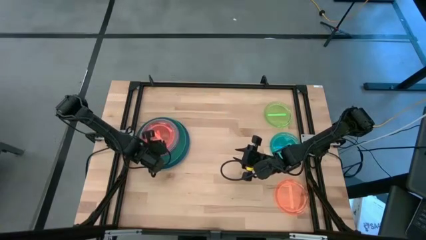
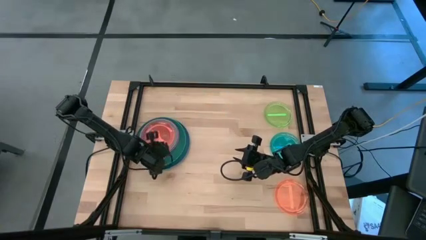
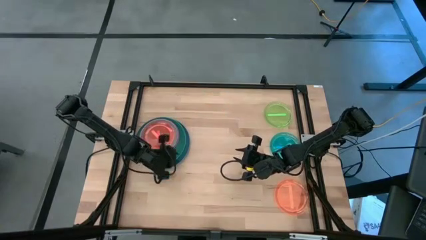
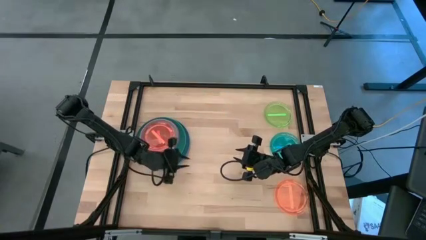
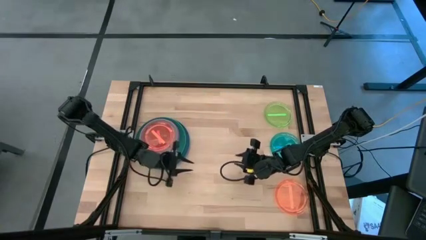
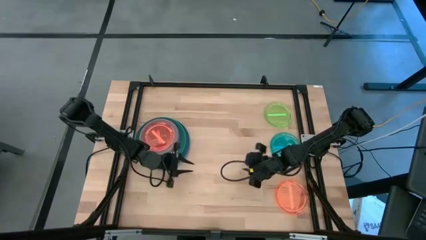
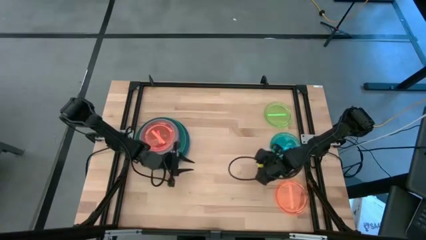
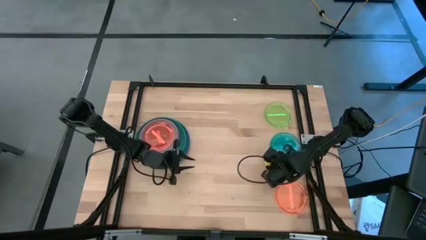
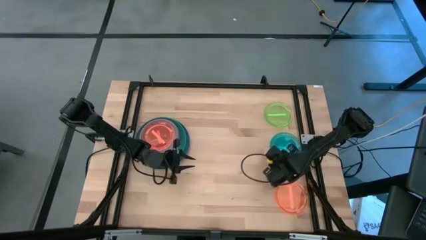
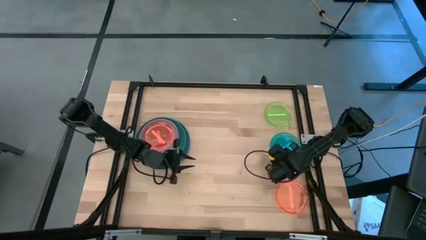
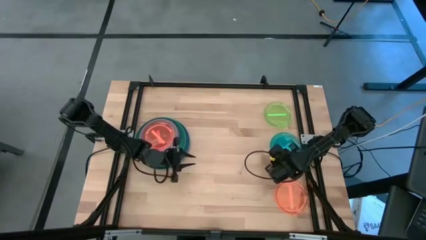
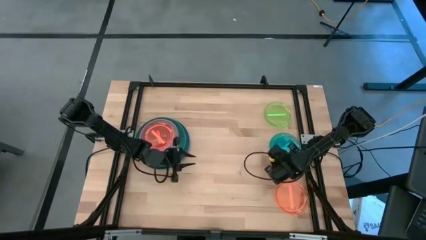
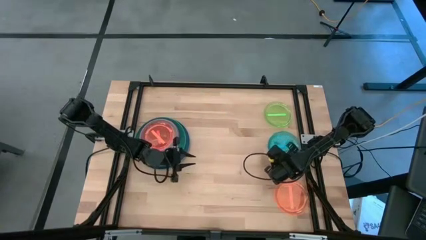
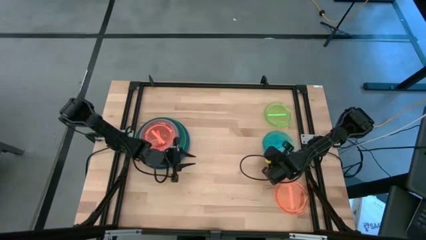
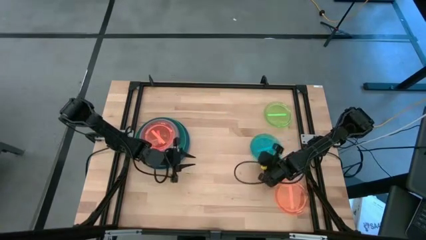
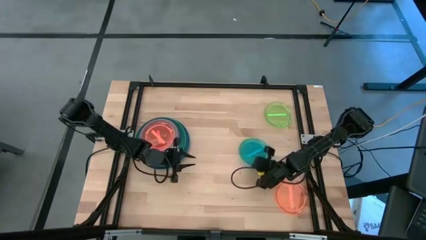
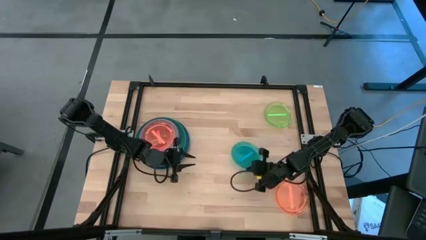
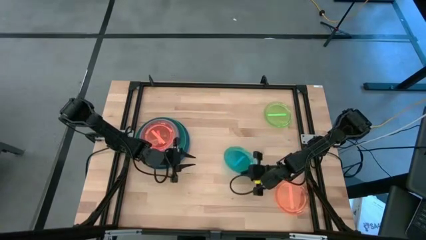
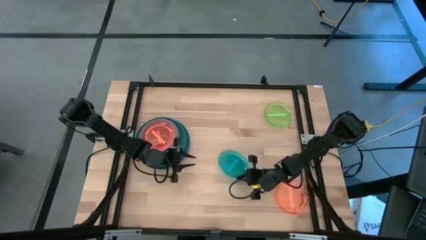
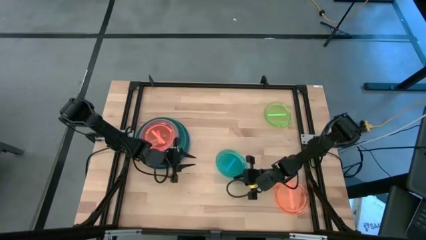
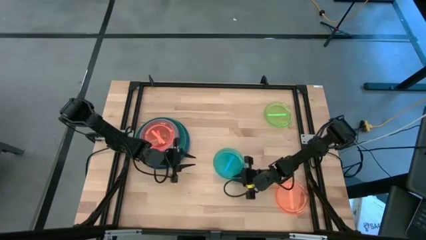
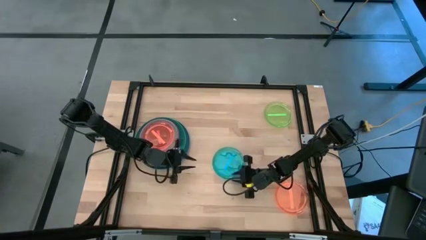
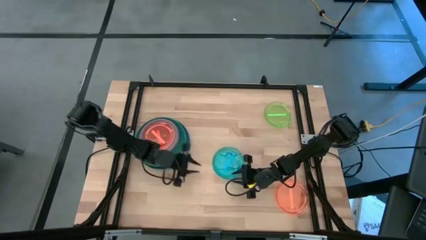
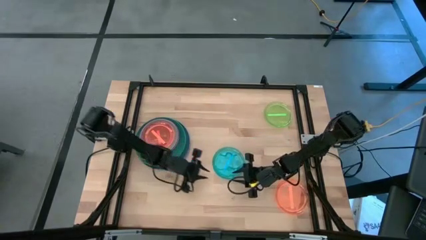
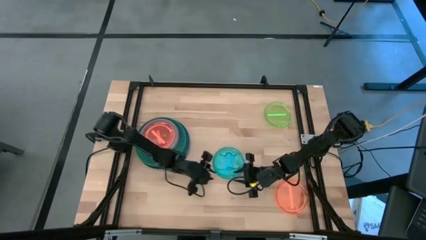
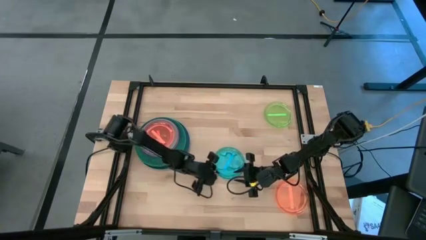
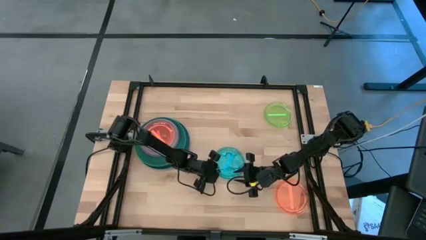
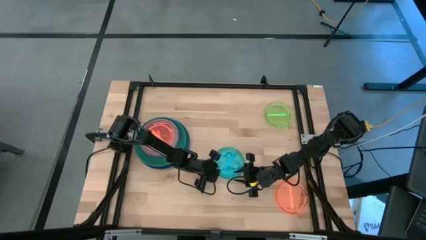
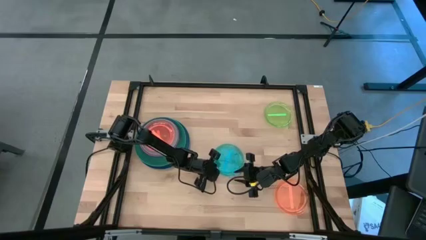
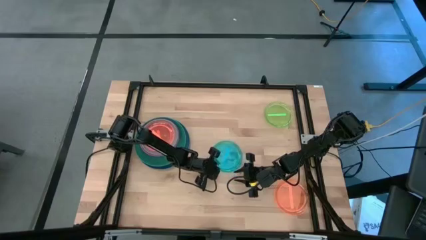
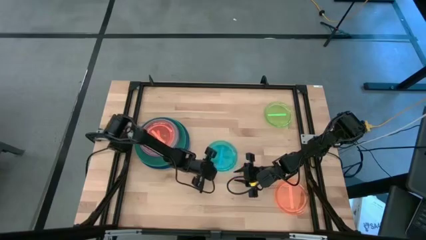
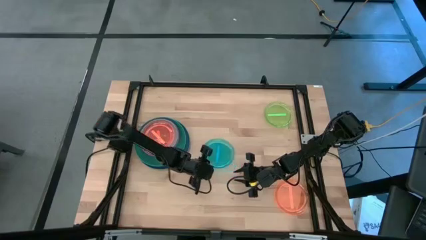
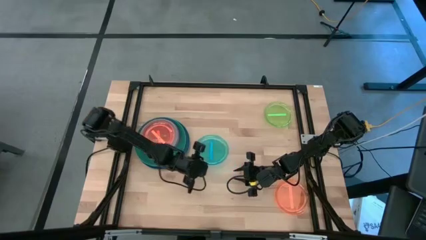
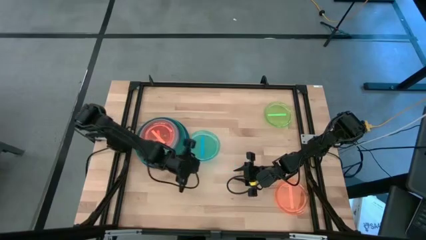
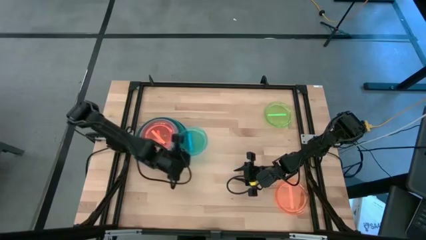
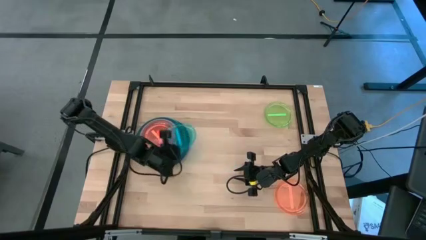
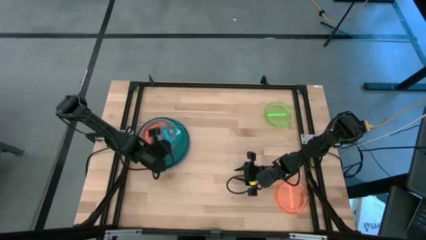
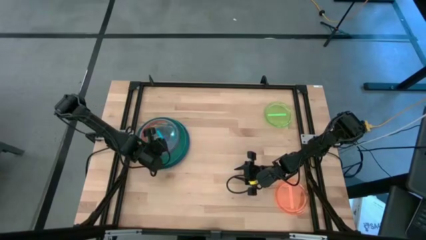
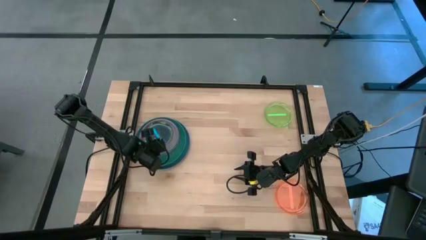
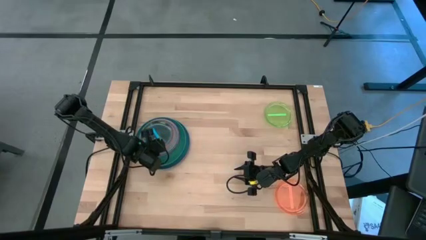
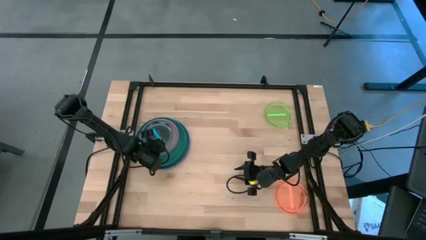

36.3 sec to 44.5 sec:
Task: Stack plastic plates
Stack the small blue plate on top of the small orange plate

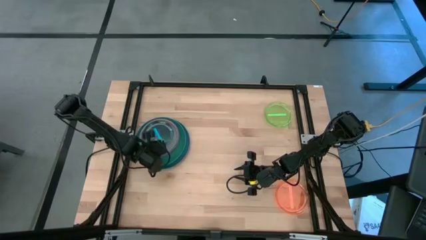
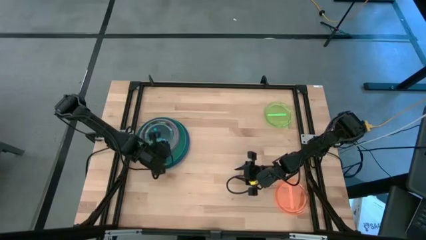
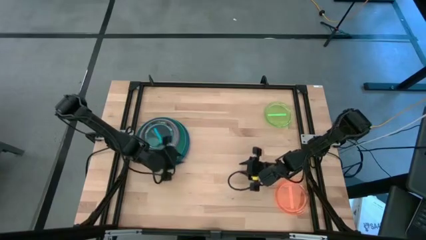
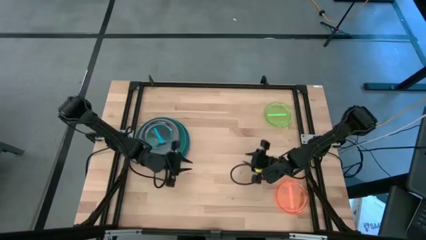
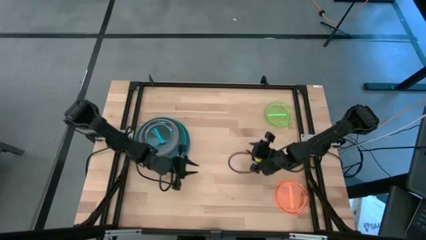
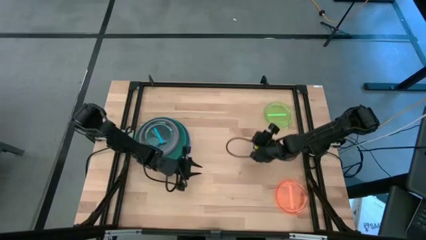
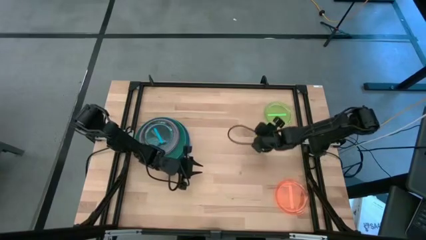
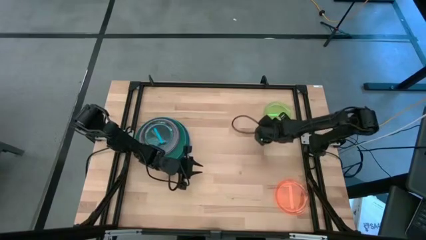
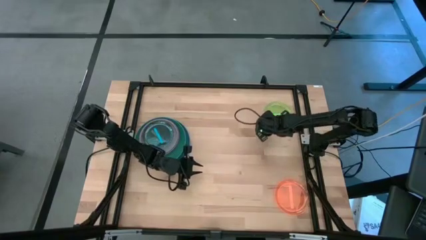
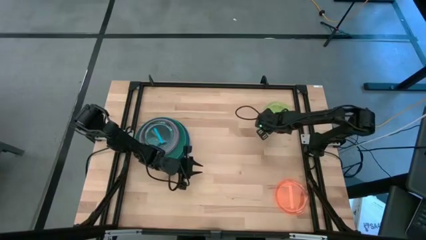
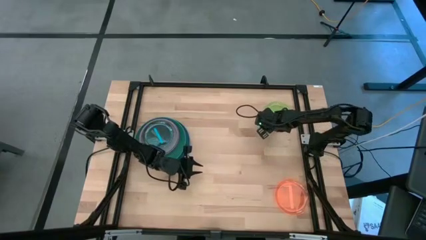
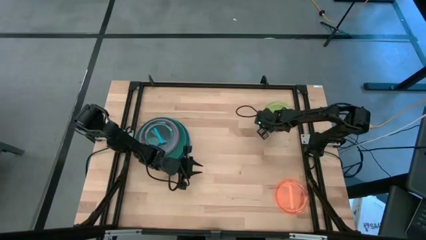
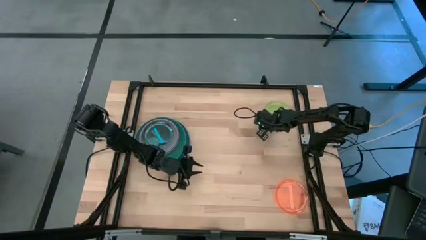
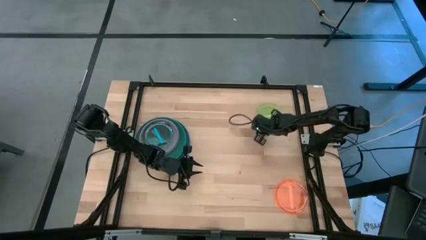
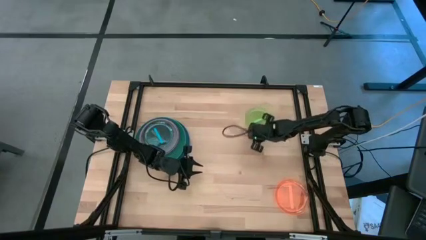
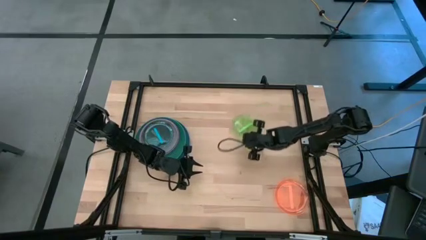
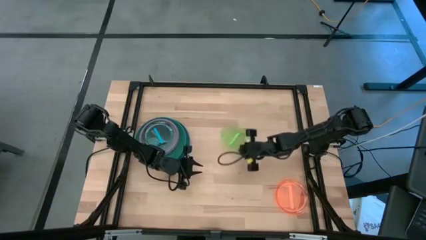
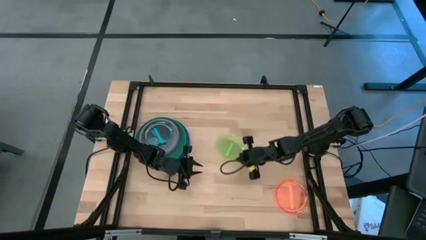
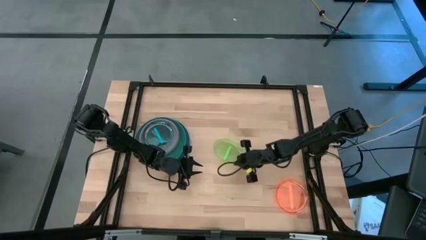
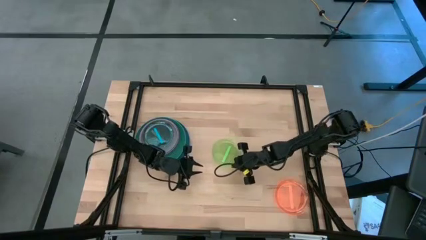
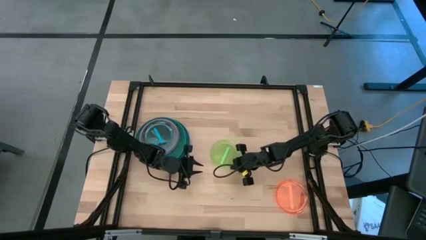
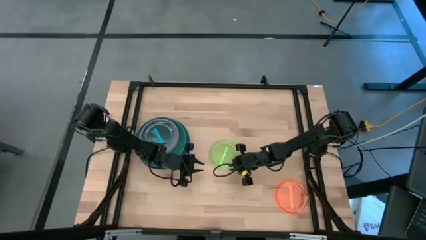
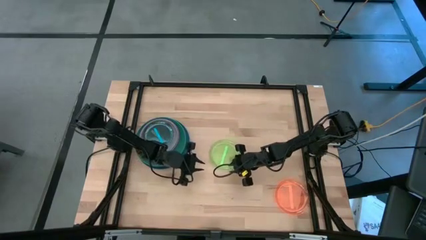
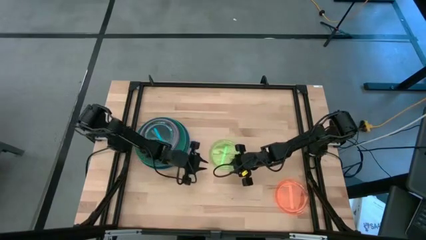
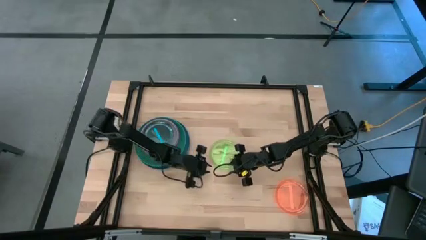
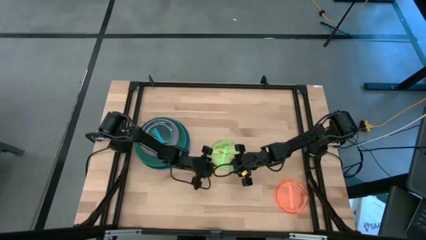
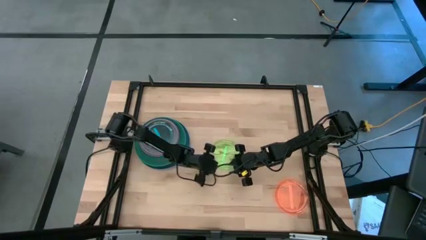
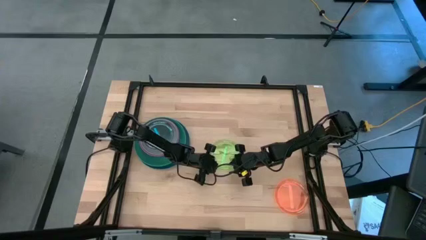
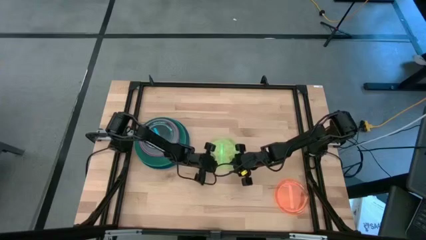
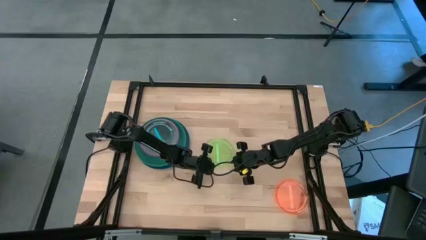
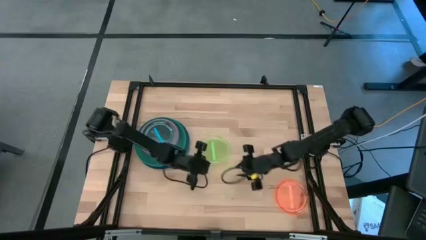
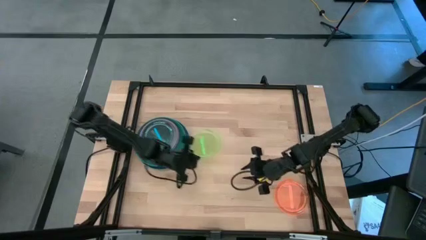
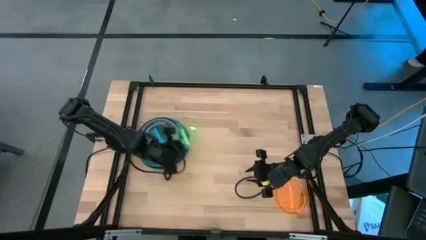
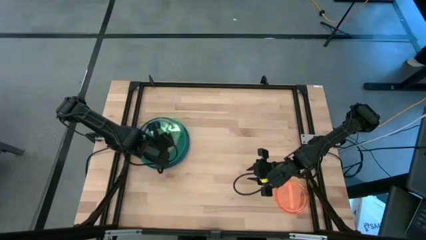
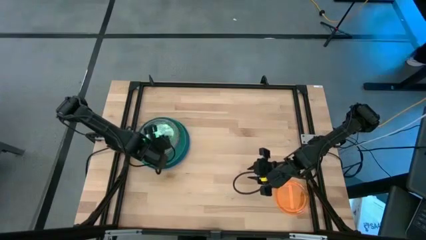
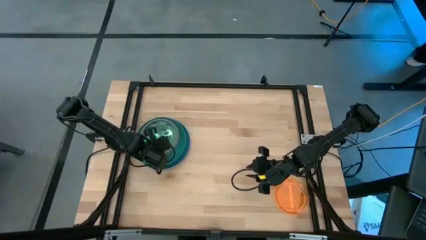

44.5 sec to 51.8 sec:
Stack the small light green plate on top of the small blue plate
